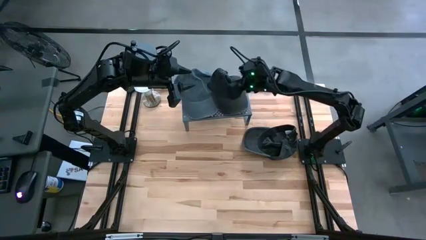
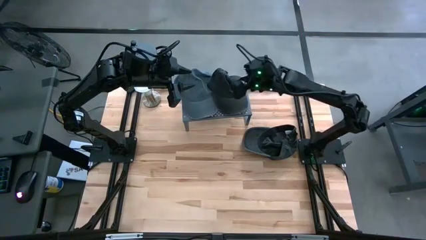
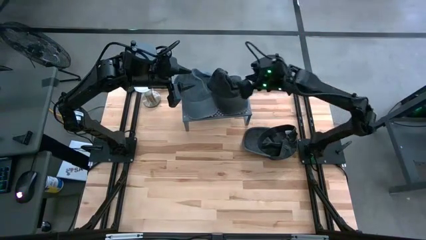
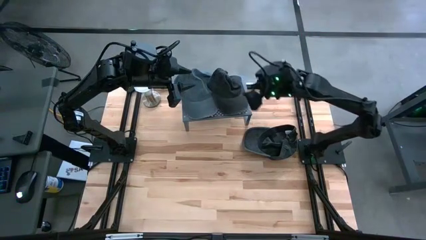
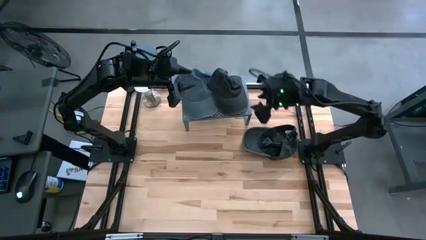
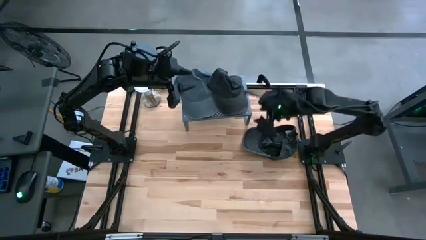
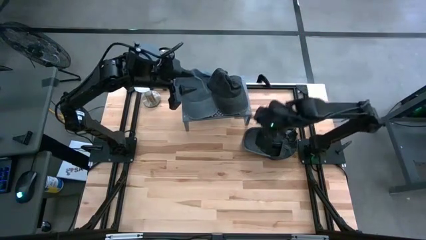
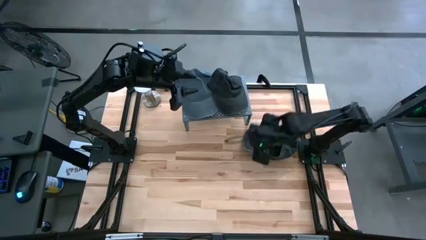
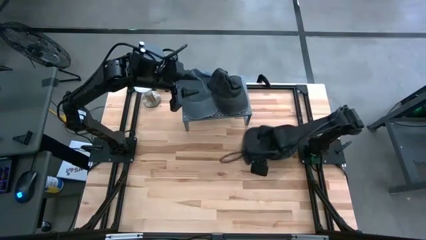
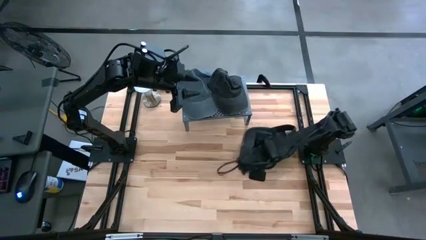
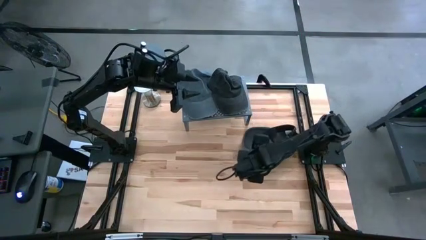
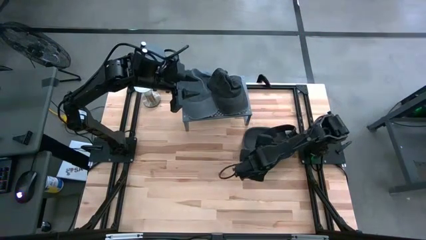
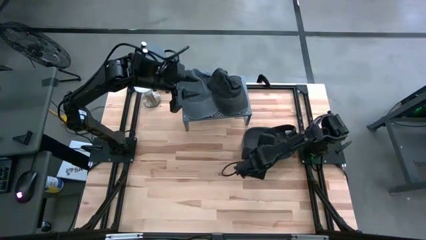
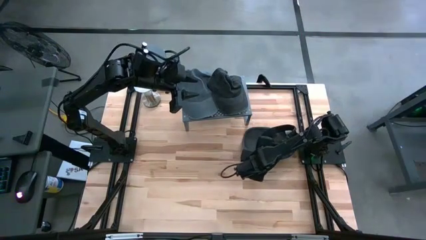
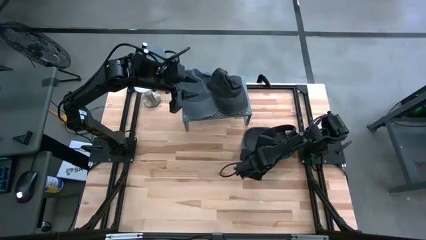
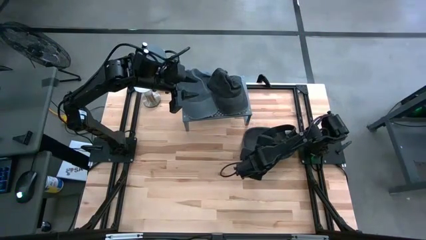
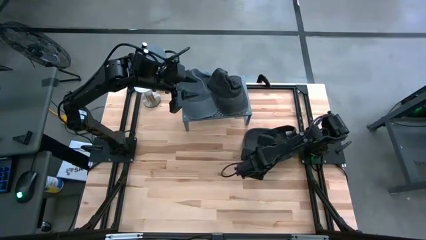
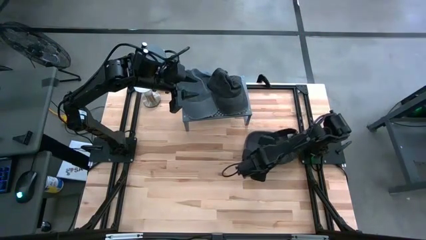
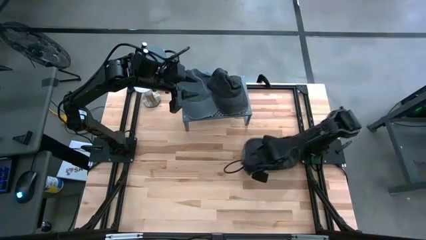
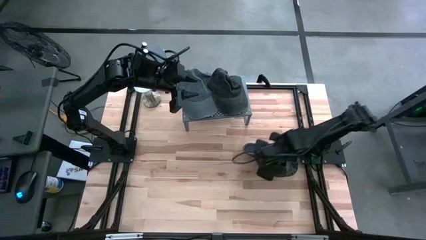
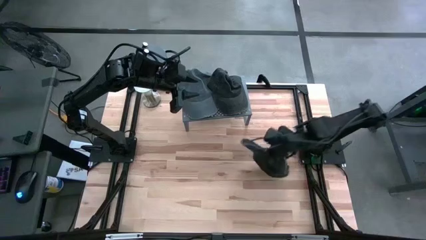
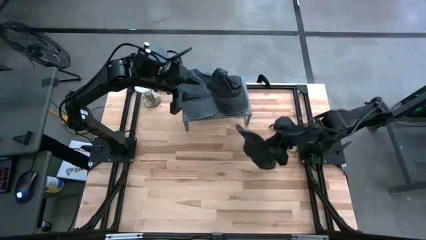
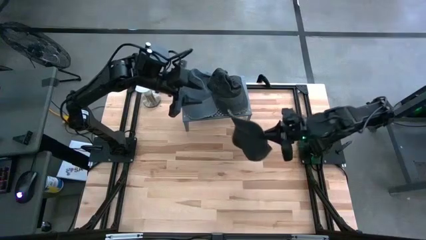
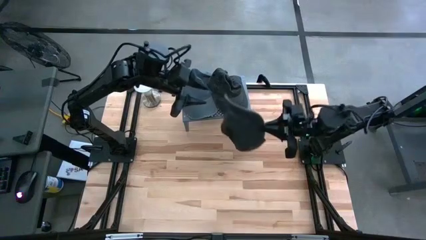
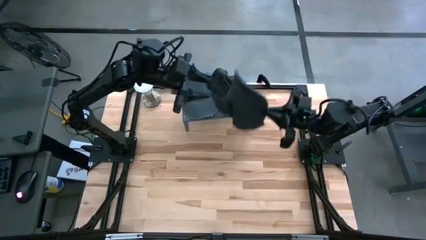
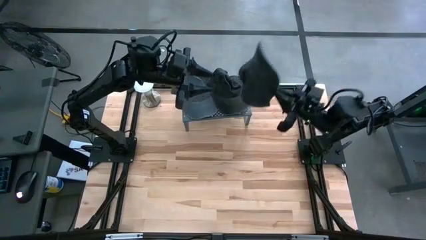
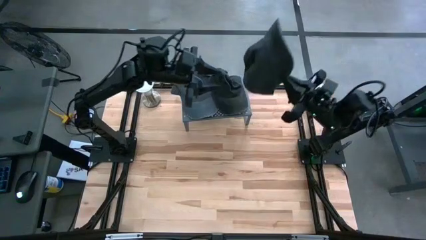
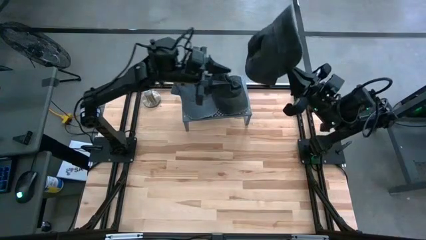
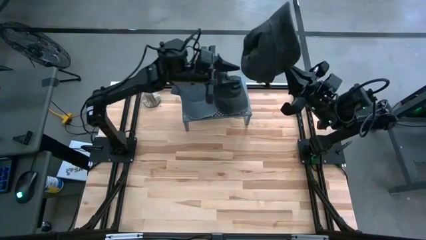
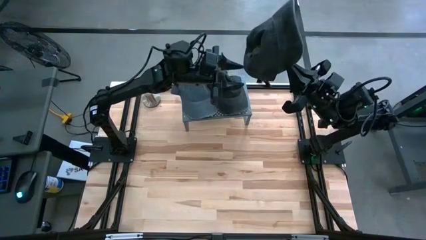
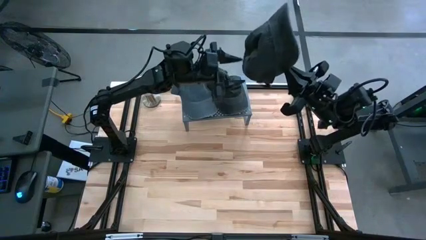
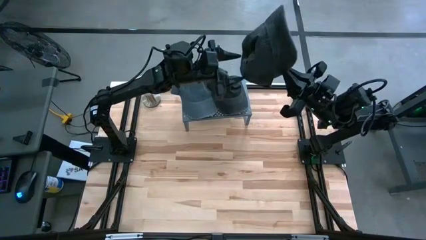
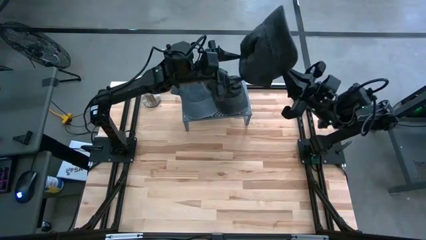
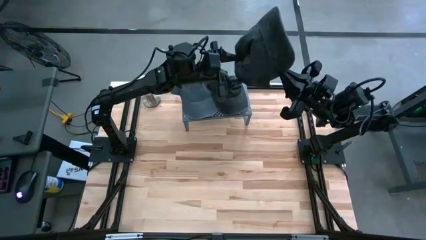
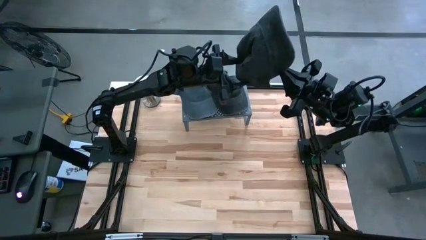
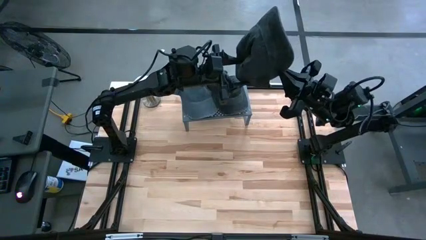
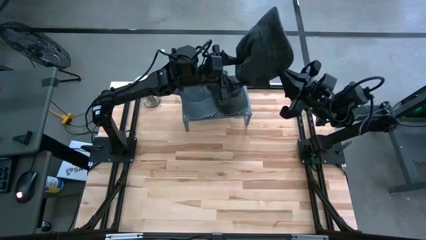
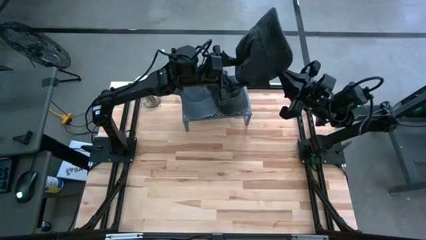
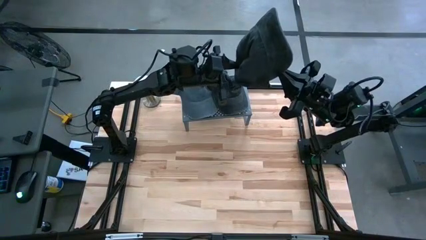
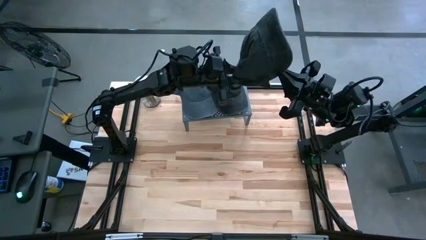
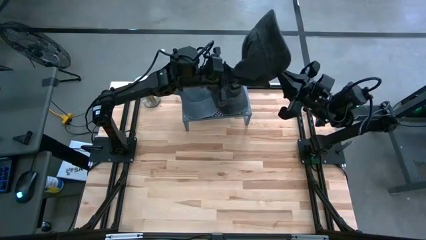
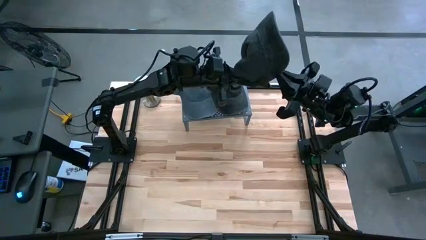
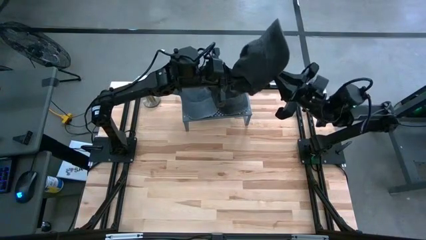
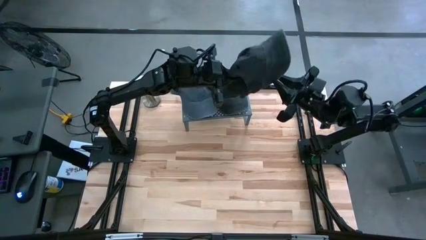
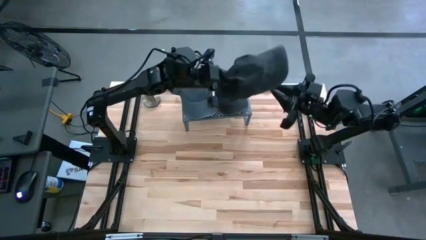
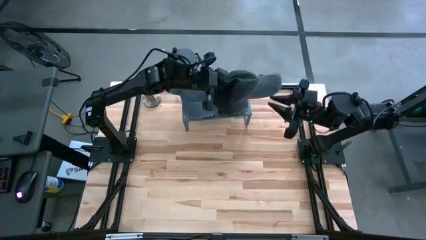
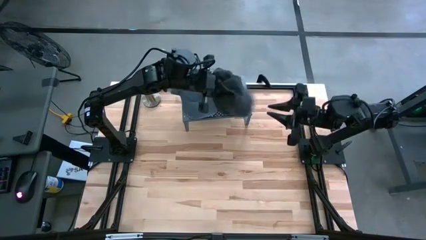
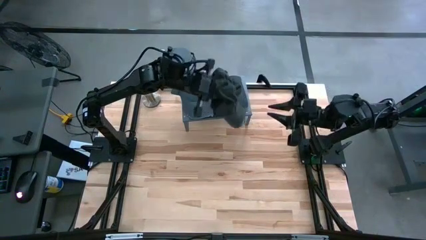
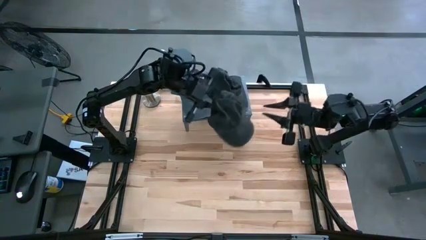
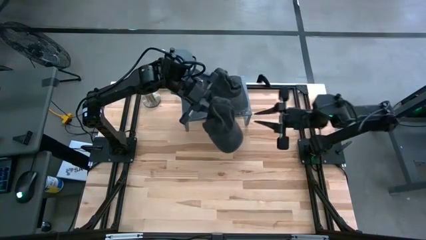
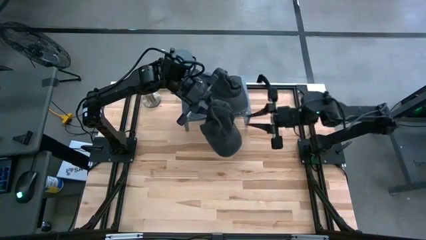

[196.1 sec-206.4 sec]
Task: Pick & Place hat
Stack the black cap on top of the other black cap

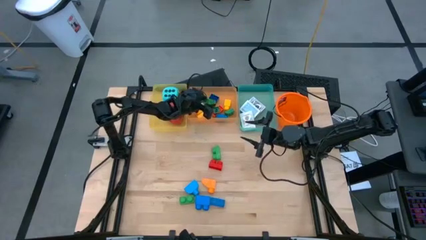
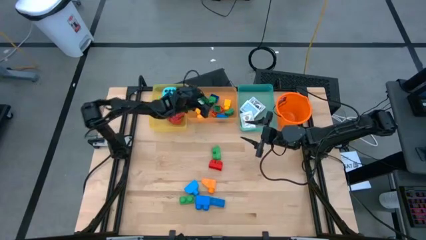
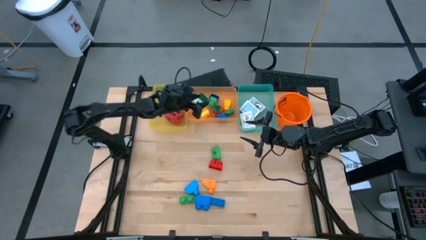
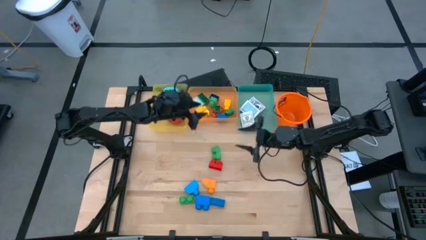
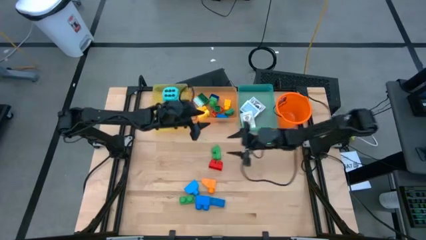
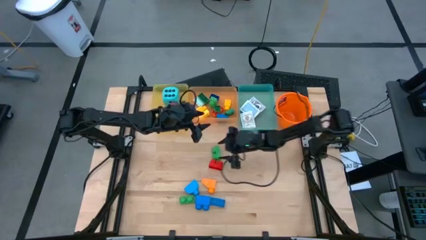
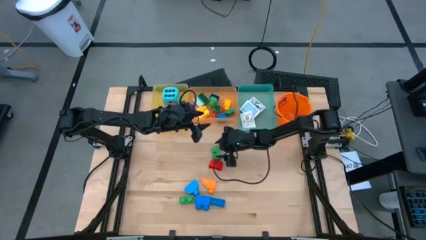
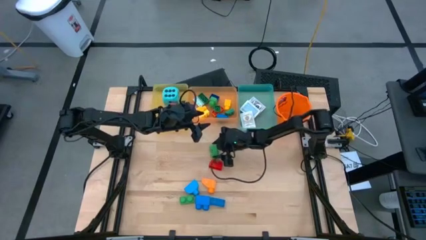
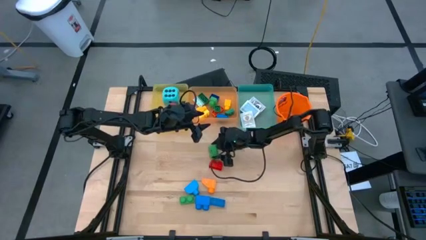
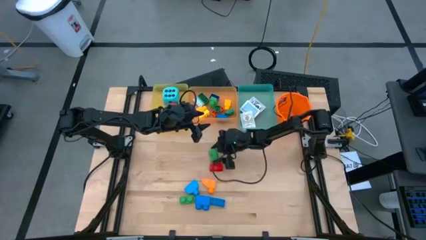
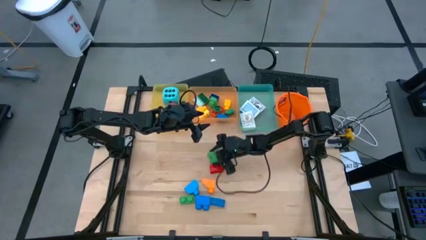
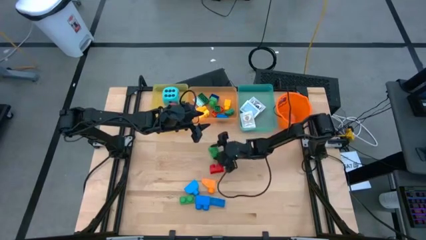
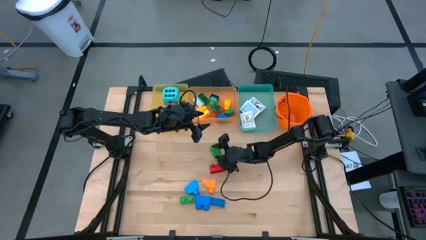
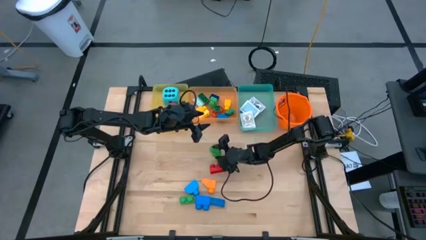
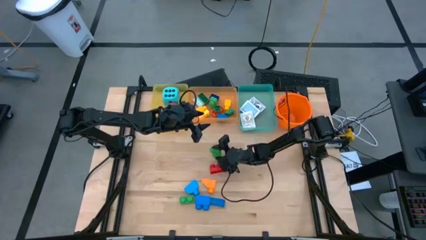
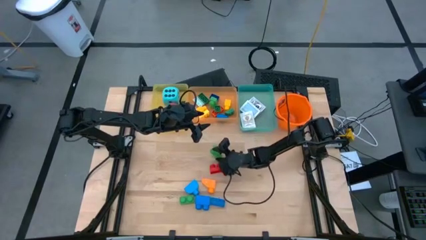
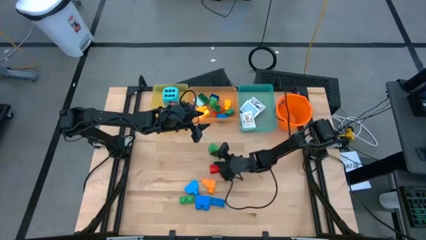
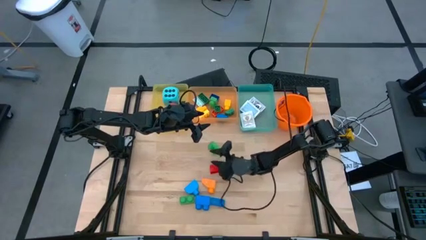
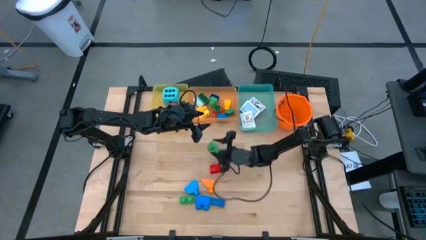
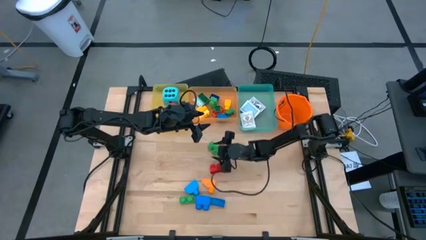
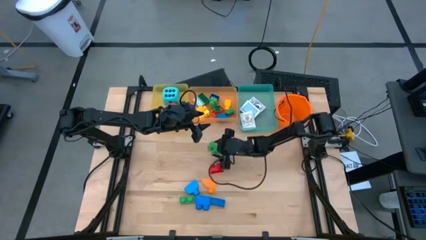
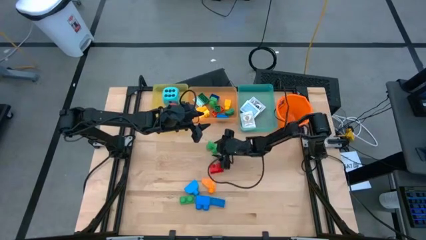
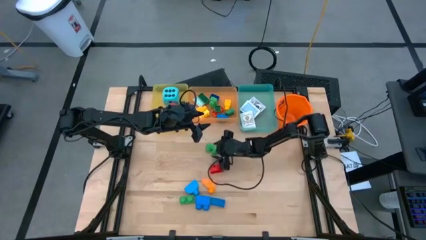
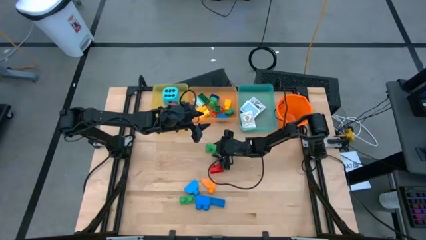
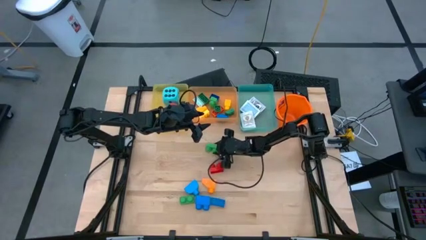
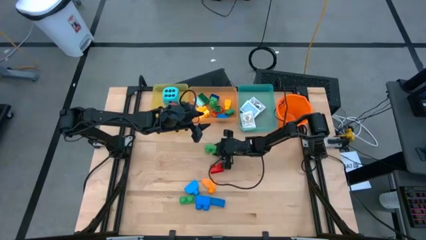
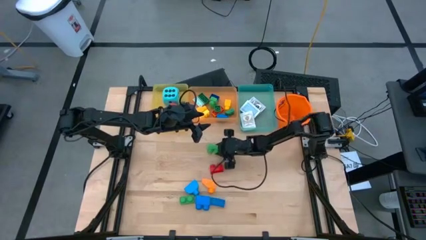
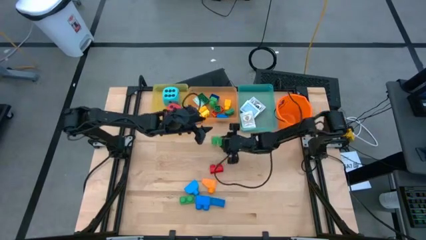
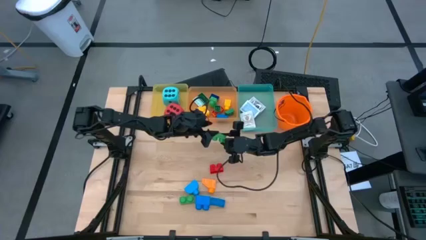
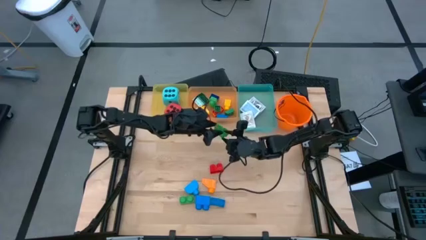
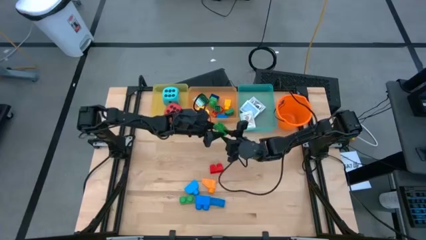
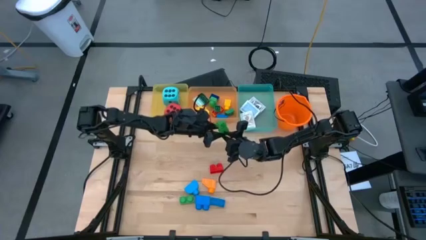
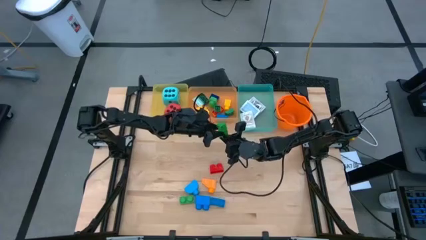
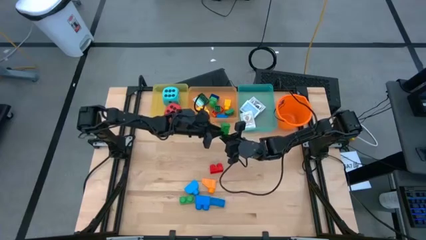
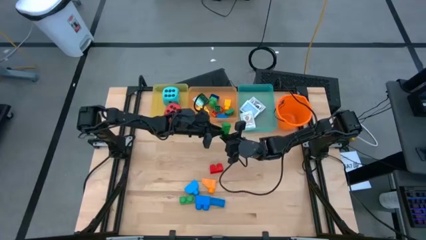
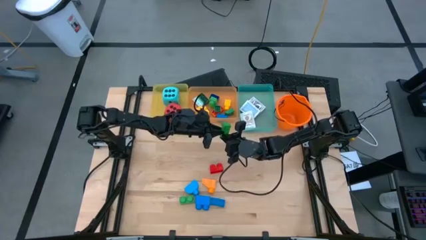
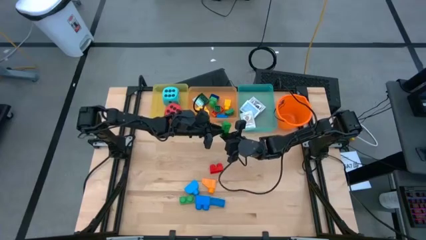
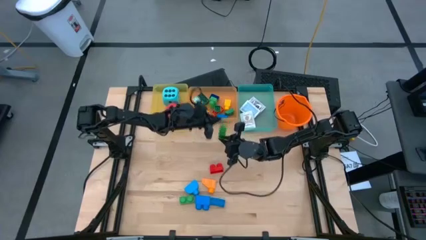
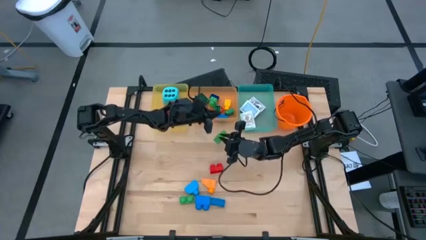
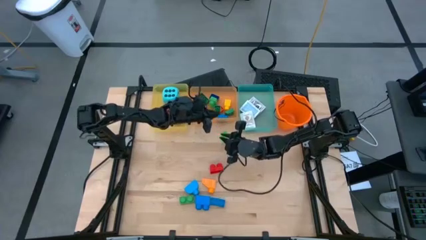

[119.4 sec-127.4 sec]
Task: Pick & Place Toys
Put the green game piece into the orange bin
